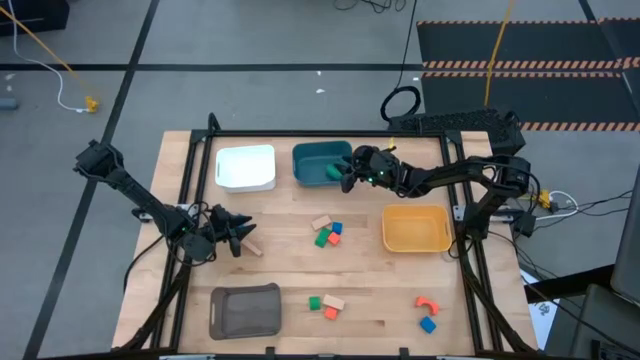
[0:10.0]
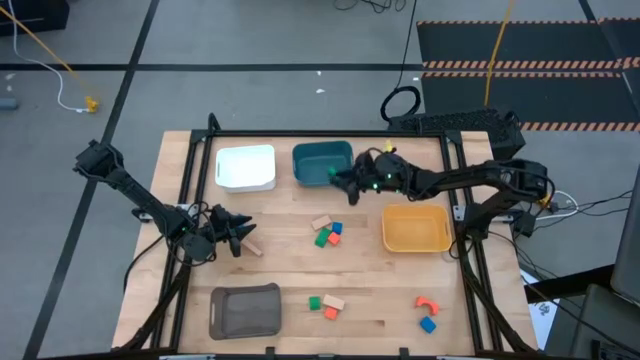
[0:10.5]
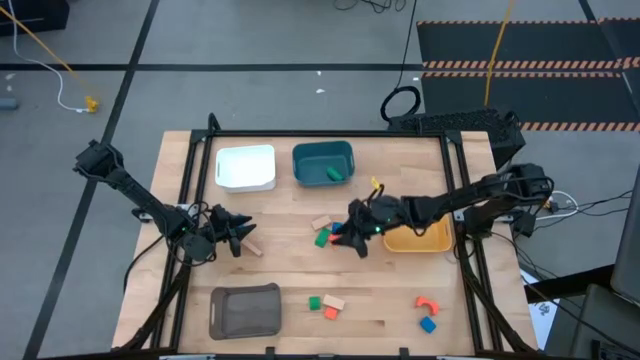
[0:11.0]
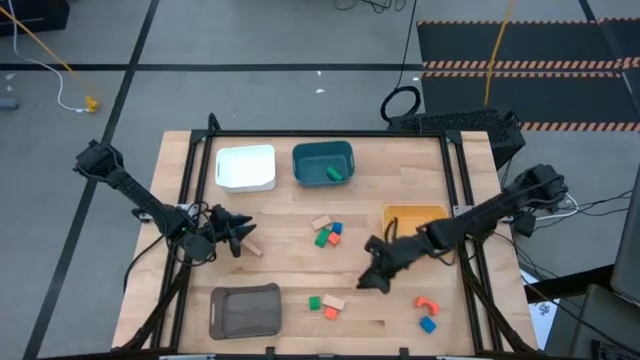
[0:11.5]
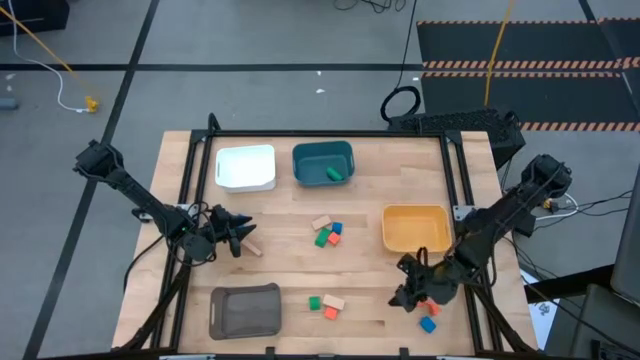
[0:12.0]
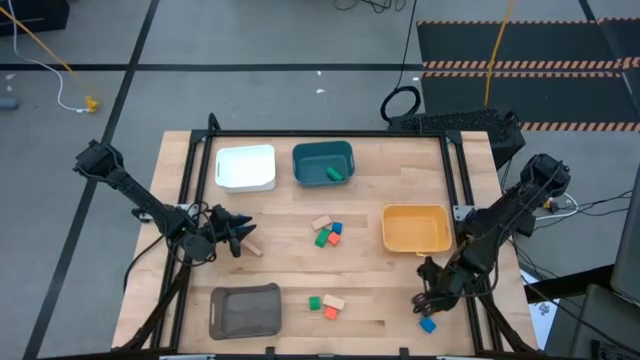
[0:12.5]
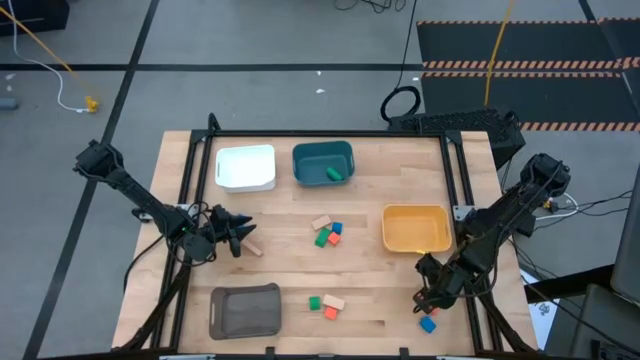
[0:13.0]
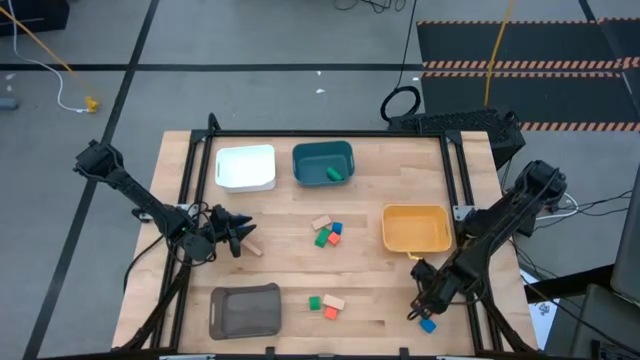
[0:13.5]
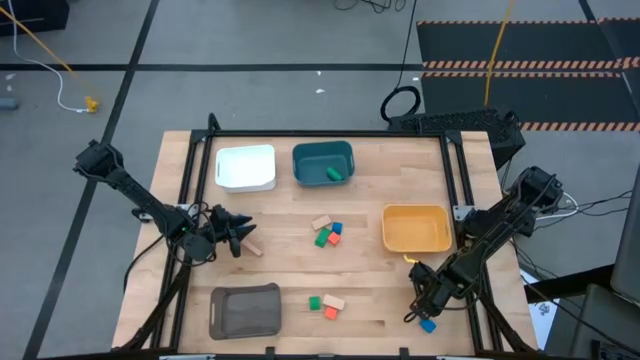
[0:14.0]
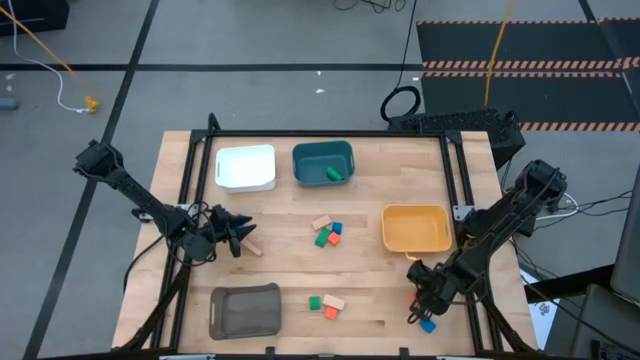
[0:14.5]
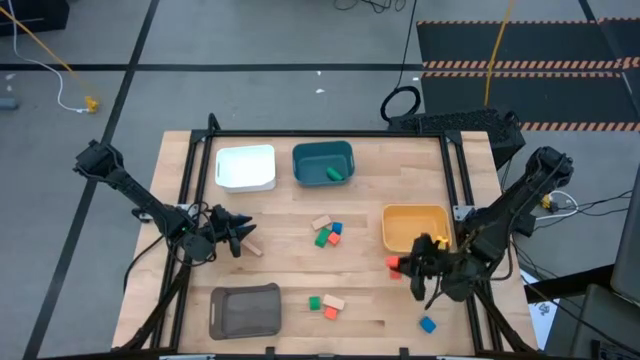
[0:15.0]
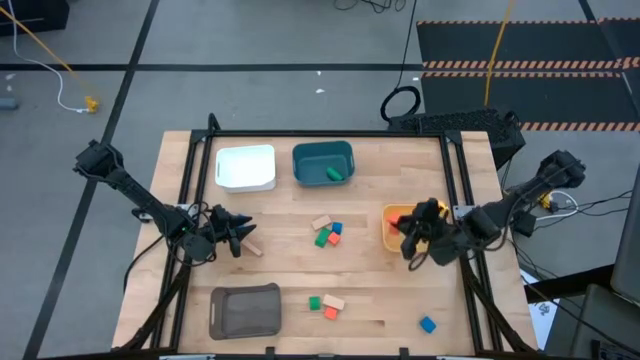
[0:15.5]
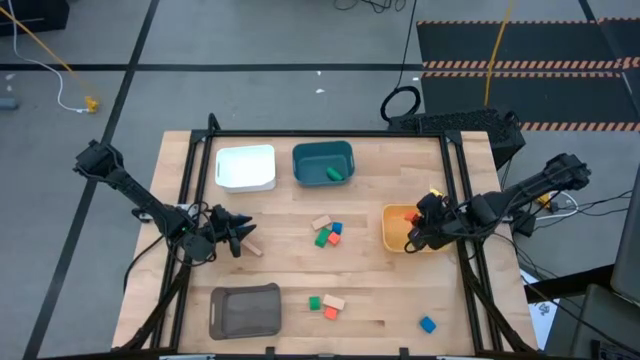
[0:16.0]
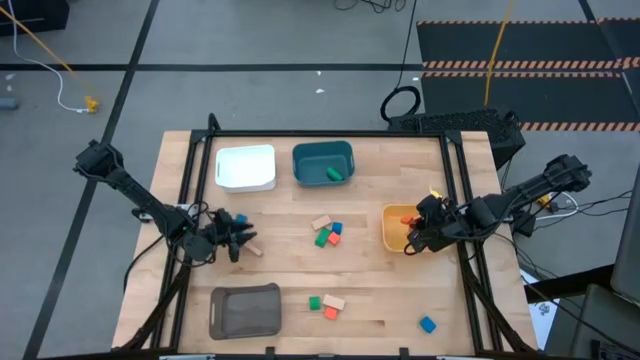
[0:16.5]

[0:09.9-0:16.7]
Task: Sort & place blocks by color
Put the bottom right orange block into the yellow bin

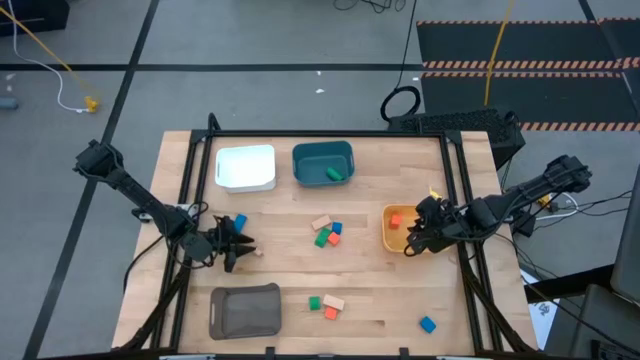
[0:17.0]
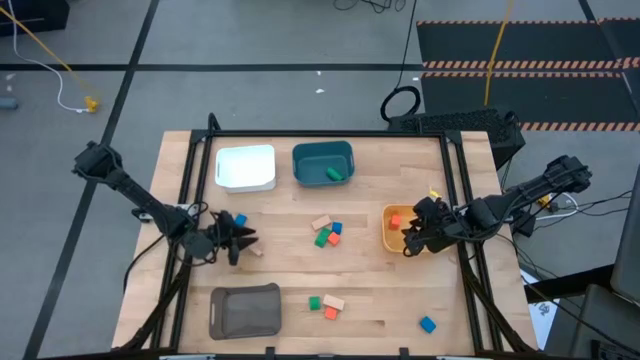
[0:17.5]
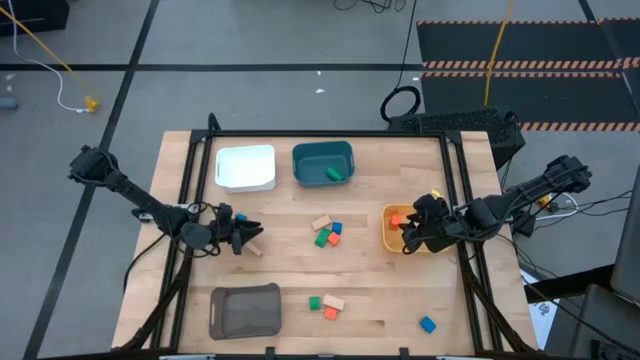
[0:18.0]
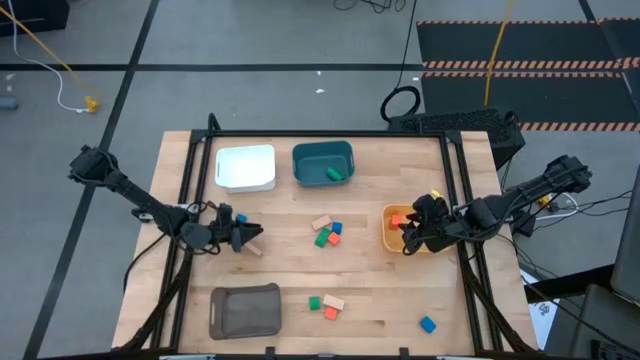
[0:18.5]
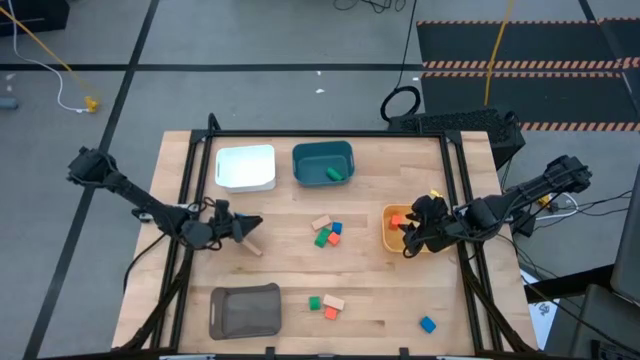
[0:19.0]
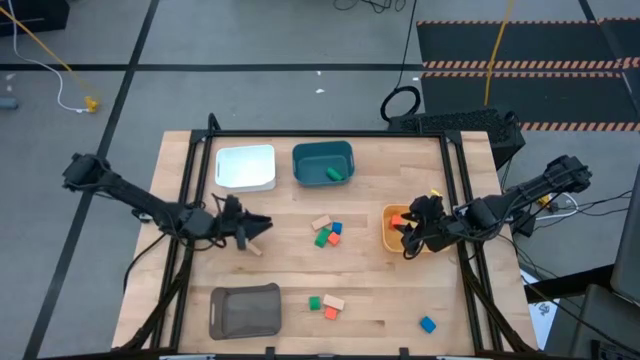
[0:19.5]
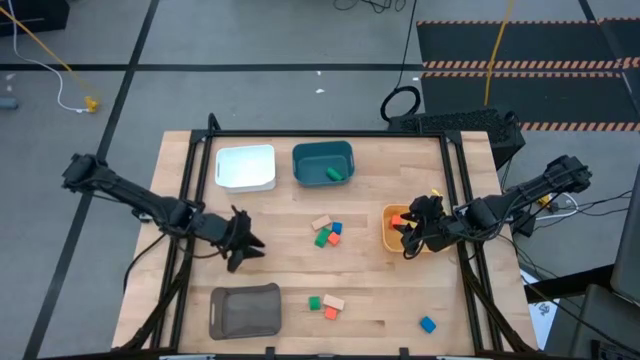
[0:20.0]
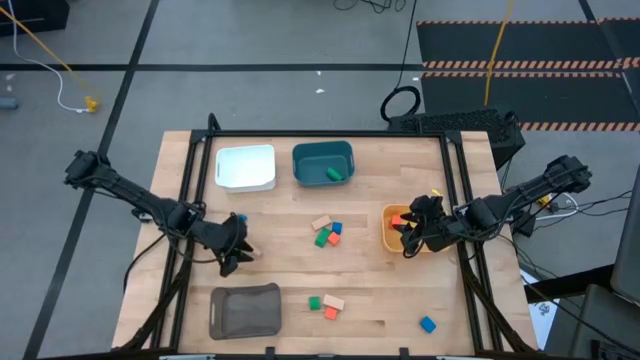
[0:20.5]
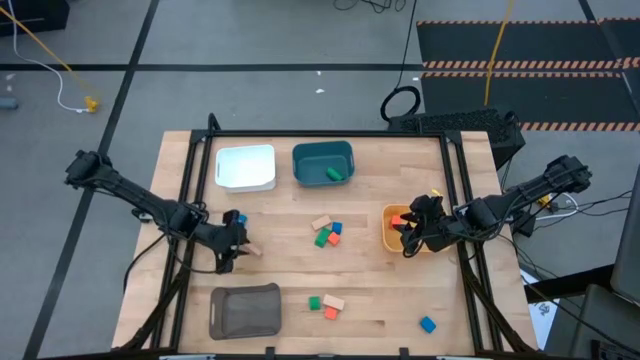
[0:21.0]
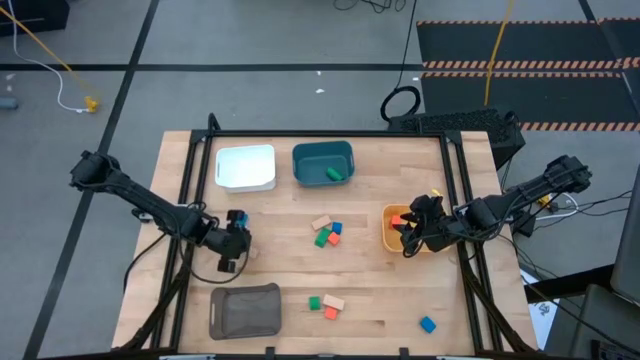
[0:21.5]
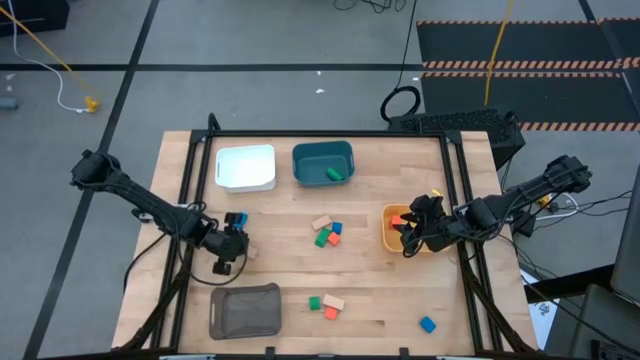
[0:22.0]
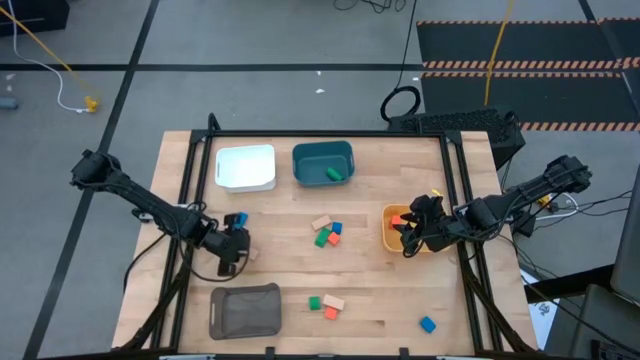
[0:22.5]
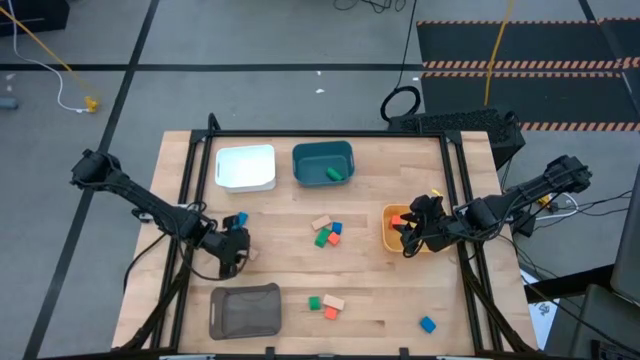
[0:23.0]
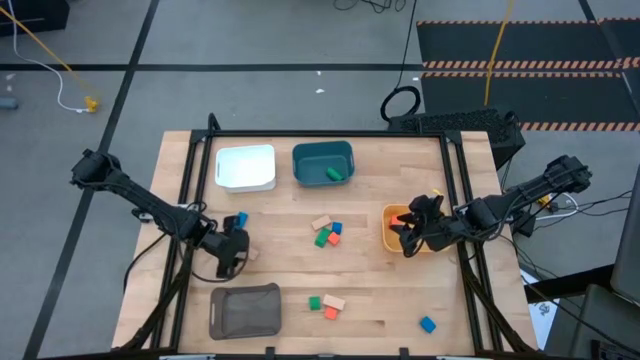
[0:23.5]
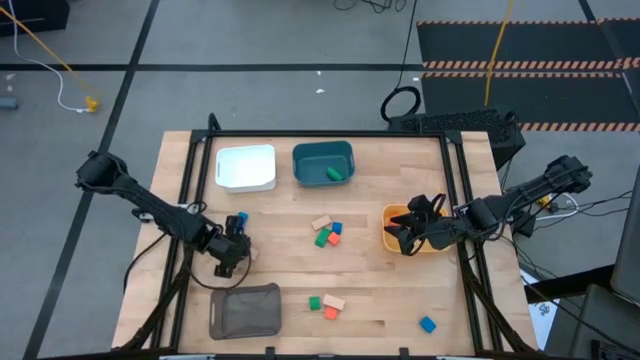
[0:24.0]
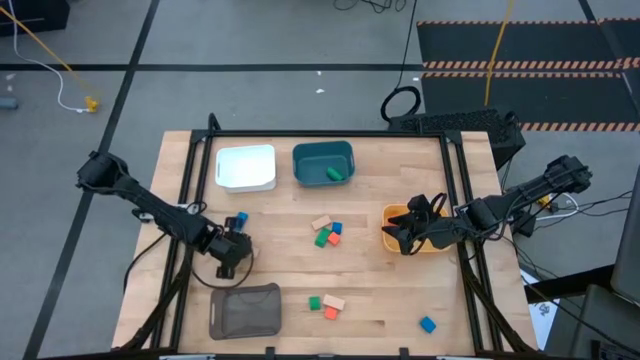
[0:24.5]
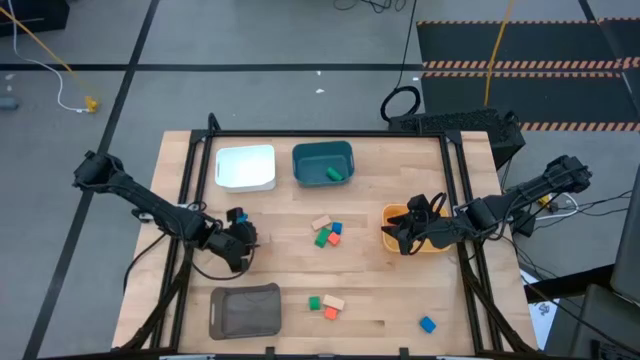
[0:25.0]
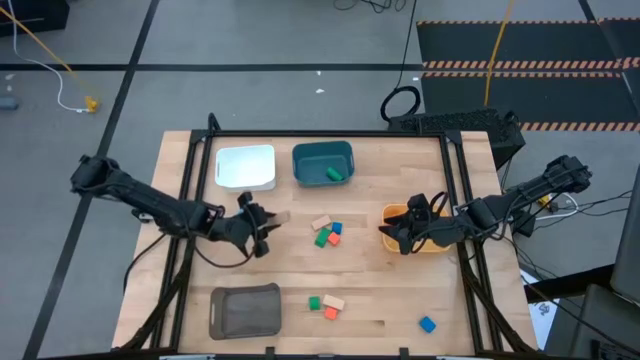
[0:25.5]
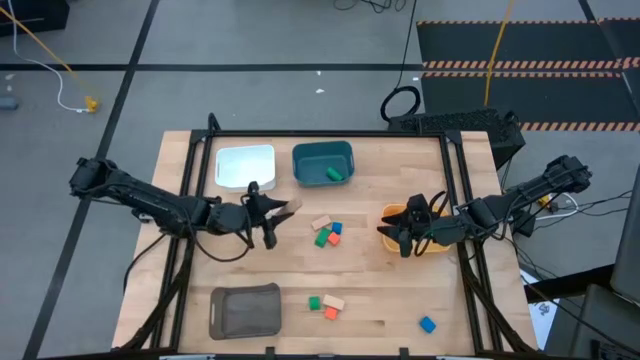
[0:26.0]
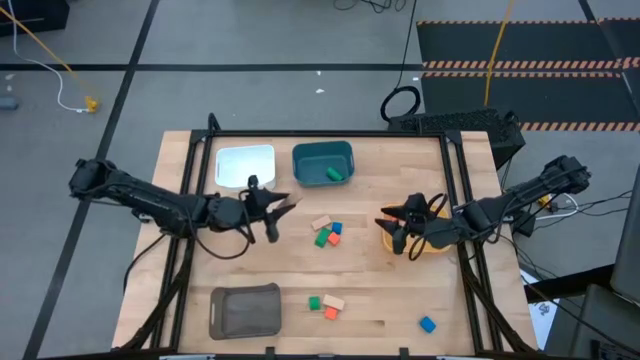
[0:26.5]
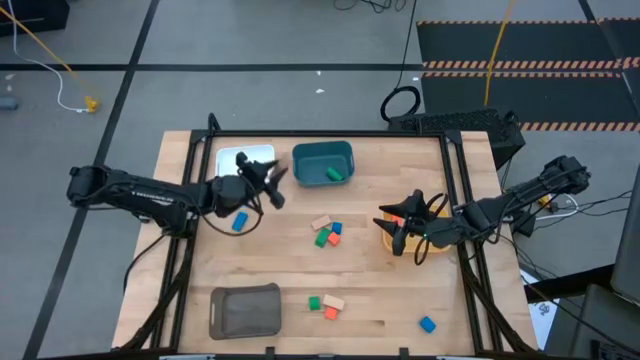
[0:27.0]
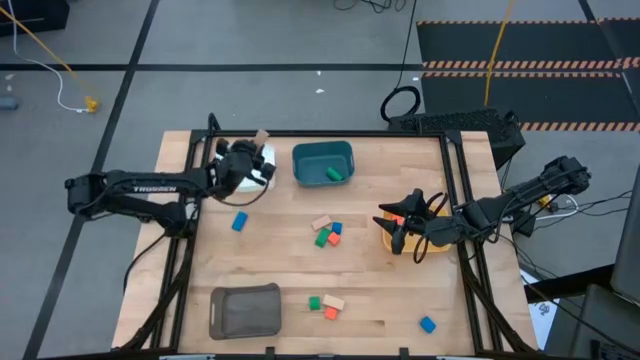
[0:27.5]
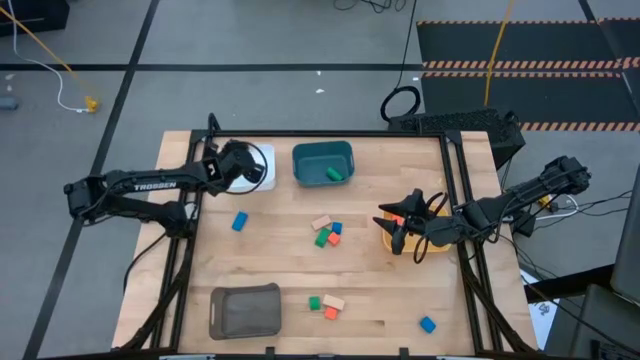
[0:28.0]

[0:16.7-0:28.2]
Put the middle left brown block into the white bin

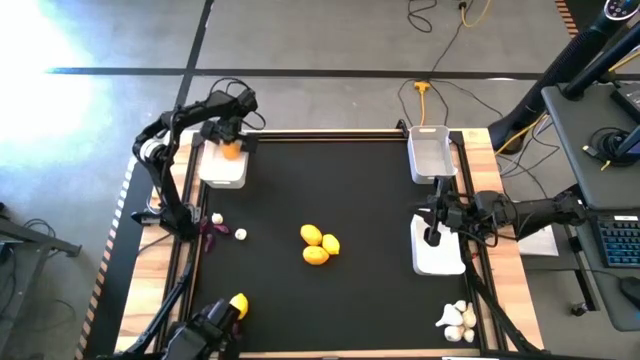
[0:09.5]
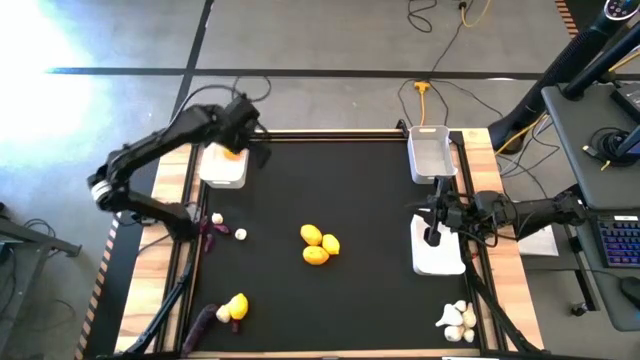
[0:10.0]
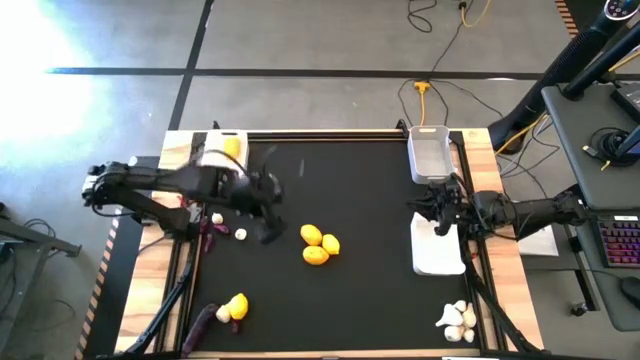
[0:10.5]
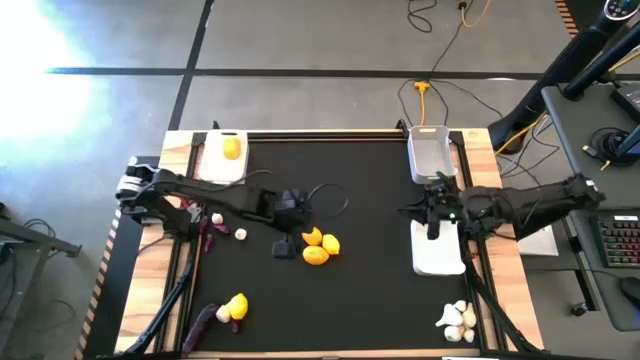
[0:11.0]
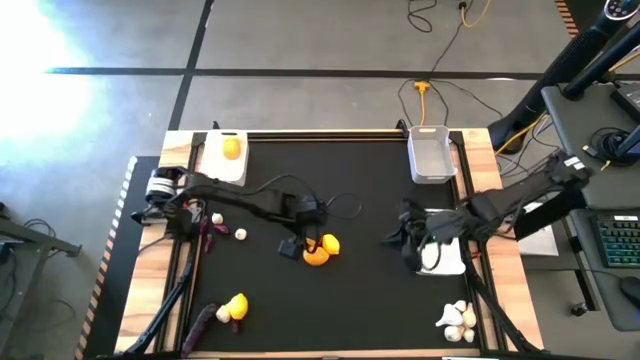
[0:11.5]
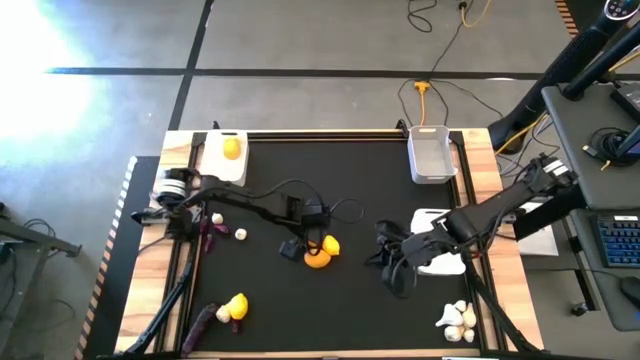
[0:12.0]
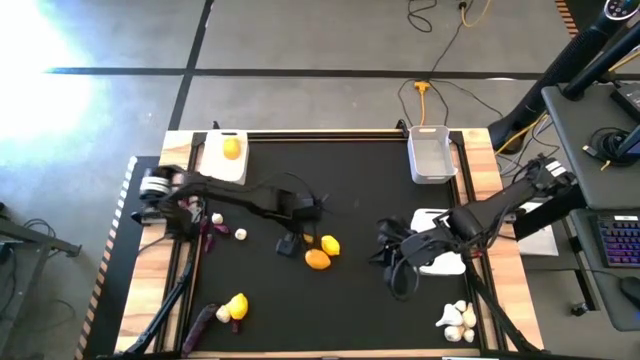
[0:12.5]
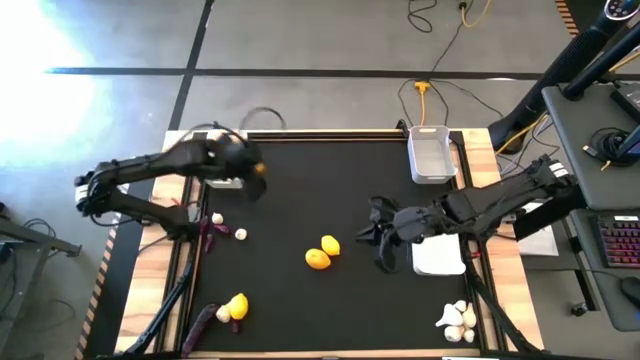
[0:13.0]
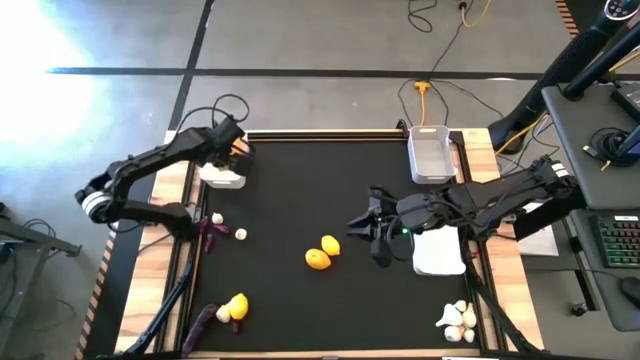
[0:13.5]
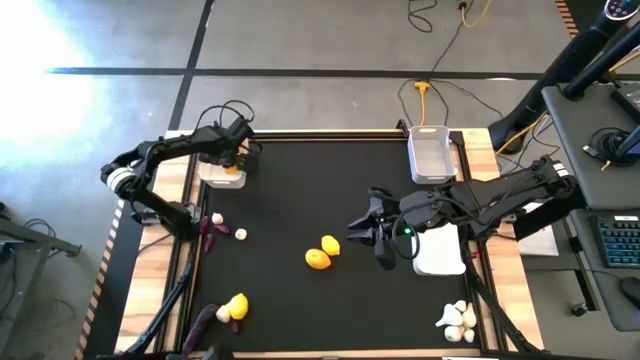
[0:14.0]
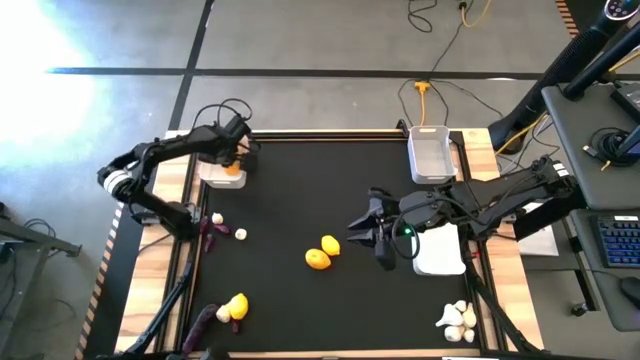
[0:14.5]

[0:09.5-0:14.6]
Task: Sort produce into baskets
Put the top center yellow lemon into the left white bin
